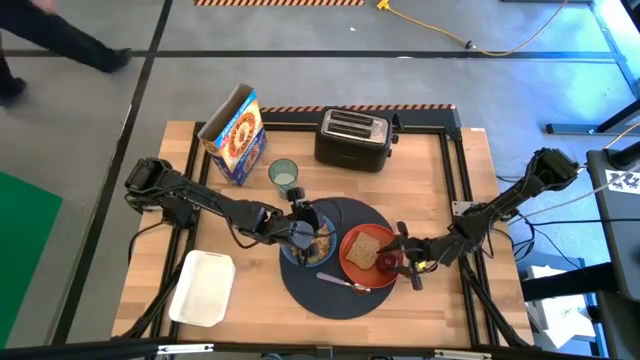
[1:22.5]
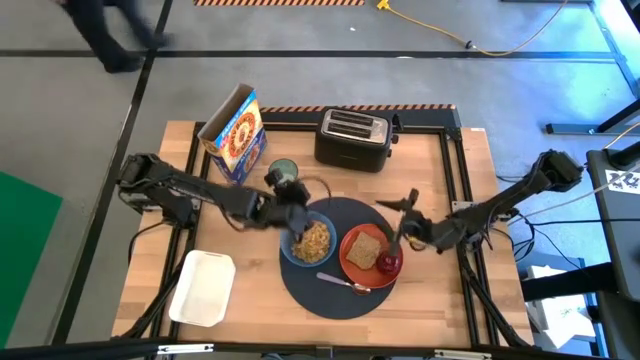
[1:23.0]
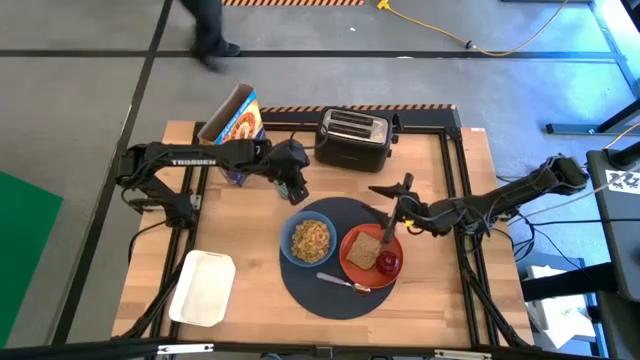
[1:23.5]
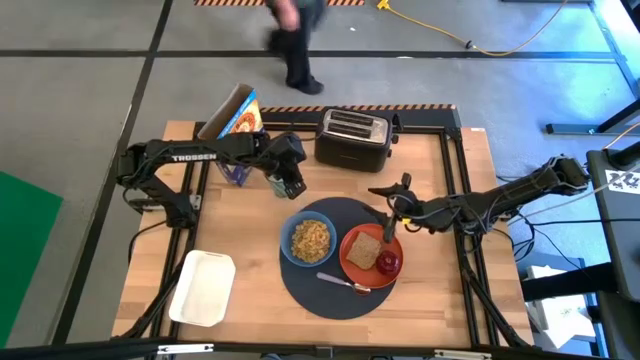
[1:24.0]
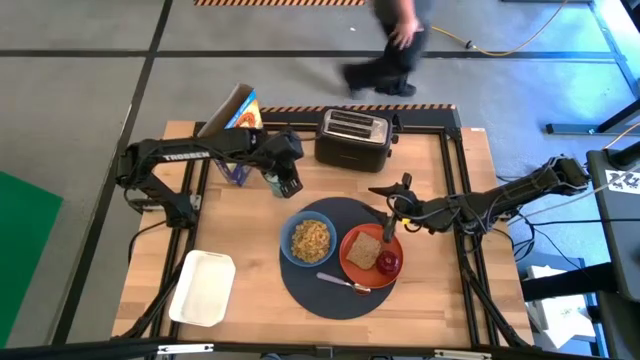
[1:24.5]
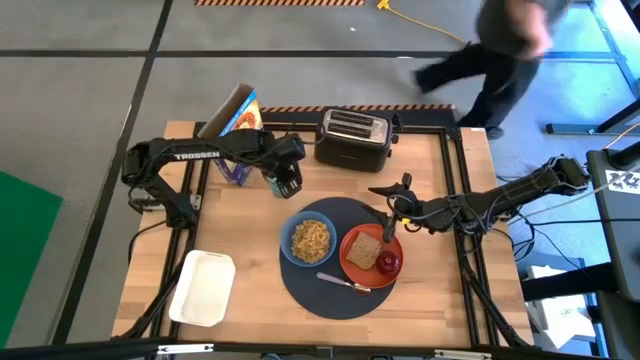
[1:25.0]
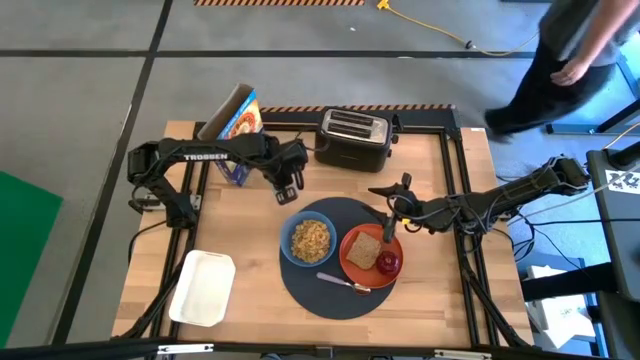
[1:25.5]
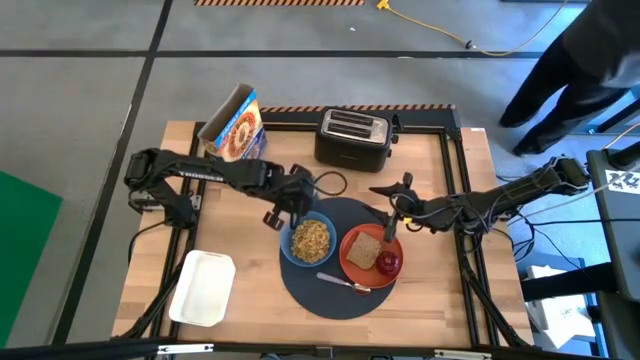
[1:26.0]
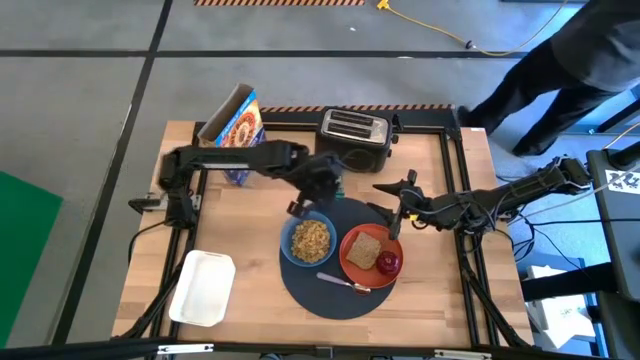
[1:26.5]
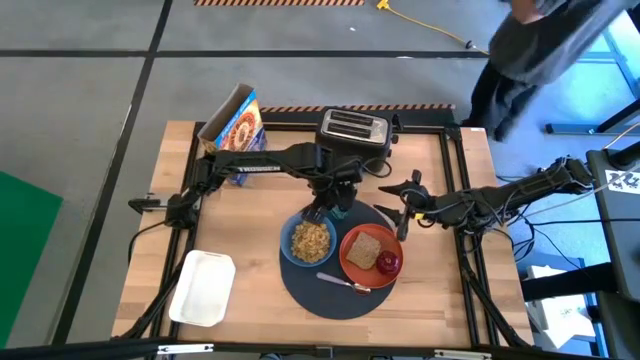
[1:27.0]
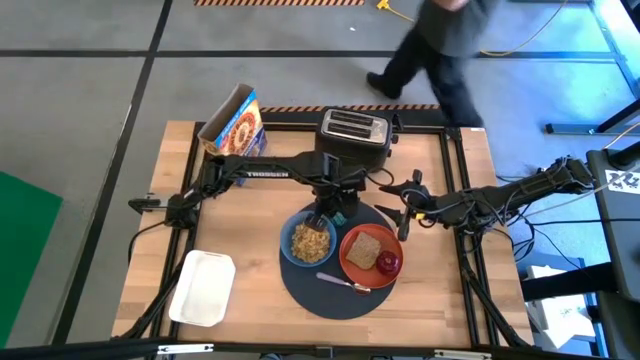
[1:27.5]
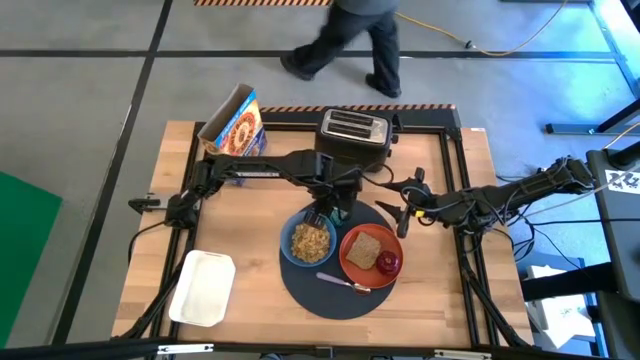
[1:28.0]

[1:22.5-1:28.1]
Task: Arrange a breakfast setting
Put the cup of milk on the place mat

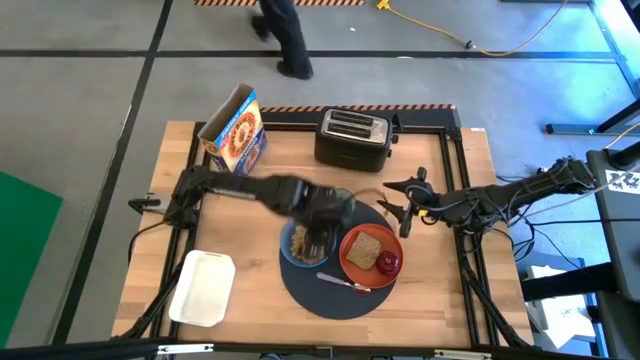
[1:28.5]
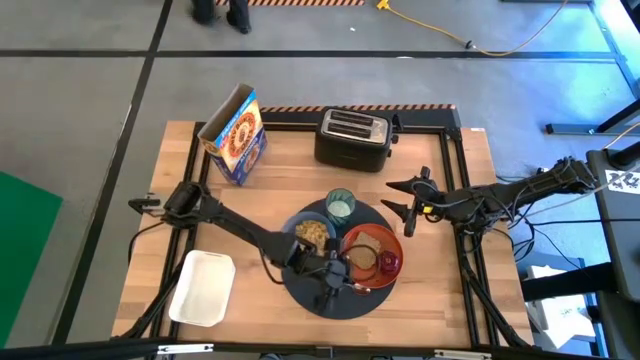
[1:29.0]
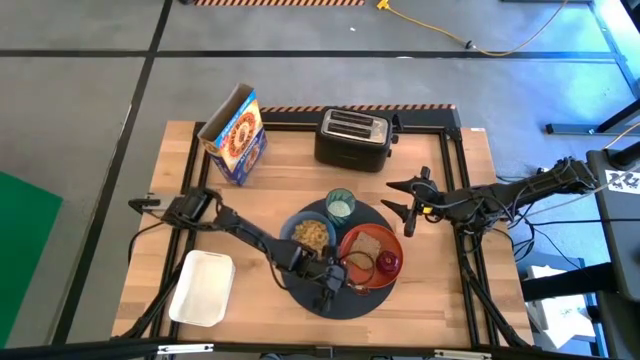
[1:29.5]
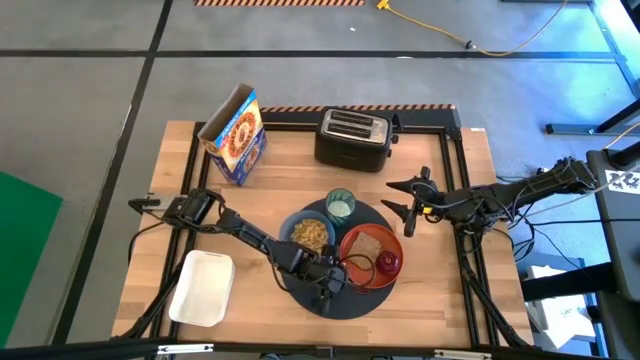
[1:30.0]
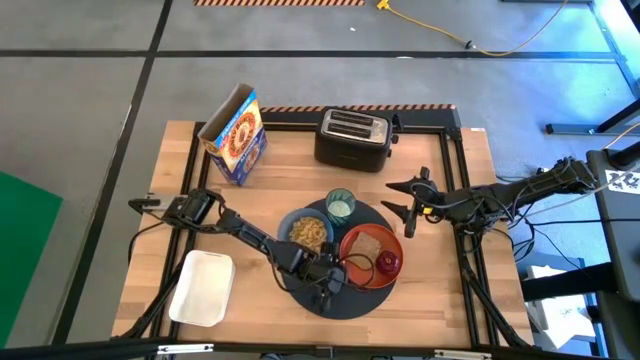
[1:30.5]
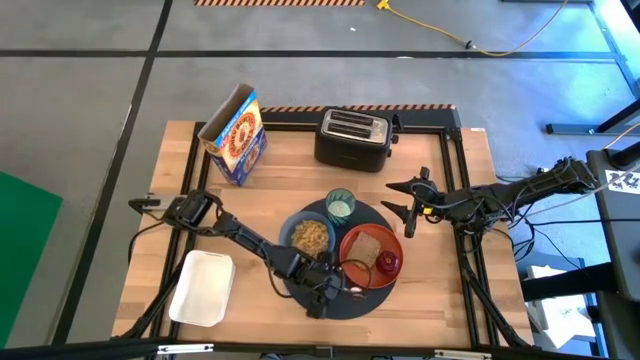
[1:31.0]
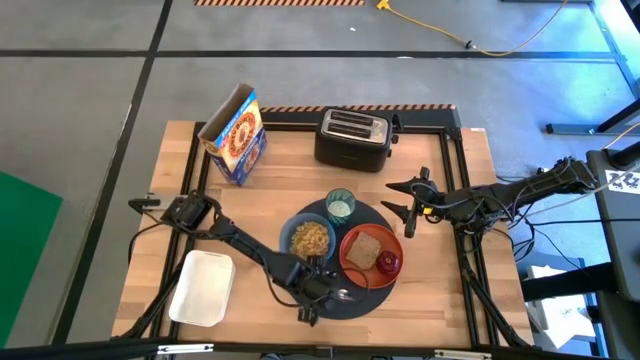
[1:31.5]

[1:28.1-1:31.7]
Adjust the purple spoon on the place mat

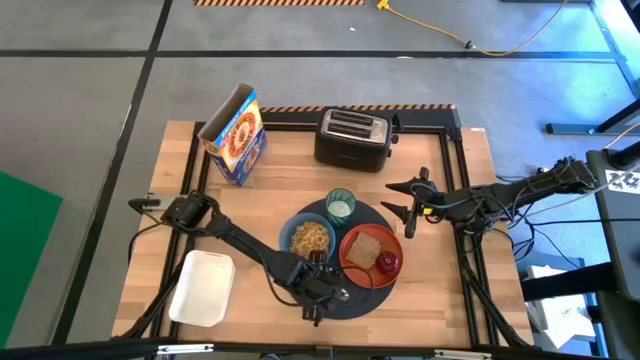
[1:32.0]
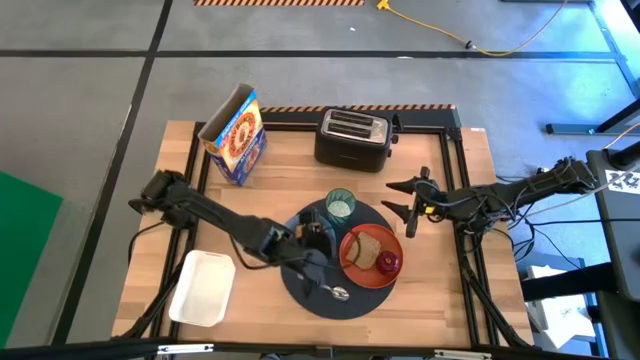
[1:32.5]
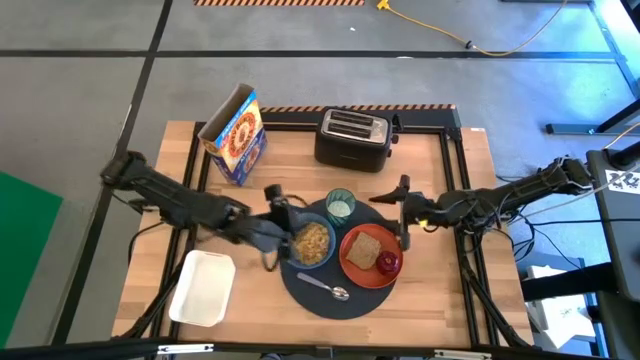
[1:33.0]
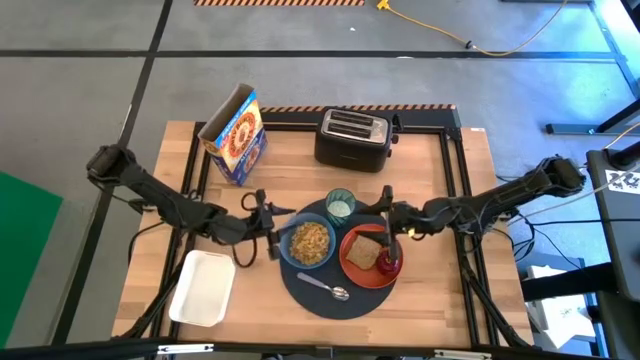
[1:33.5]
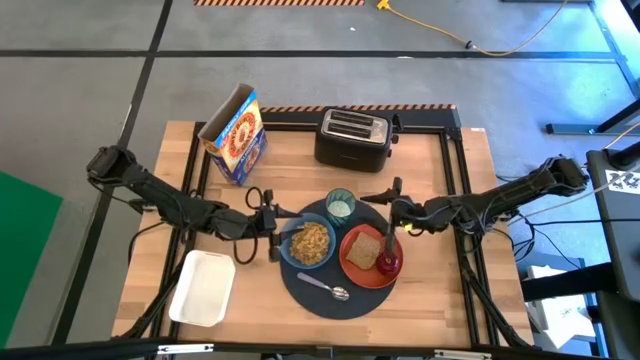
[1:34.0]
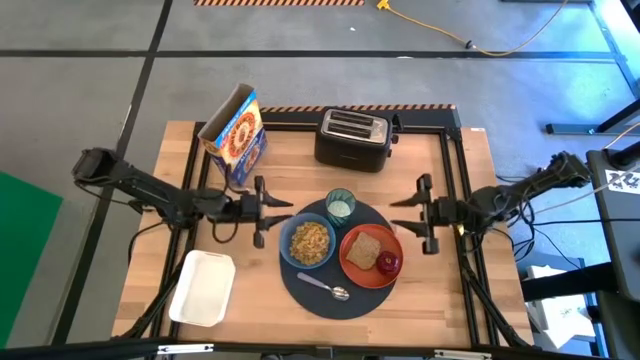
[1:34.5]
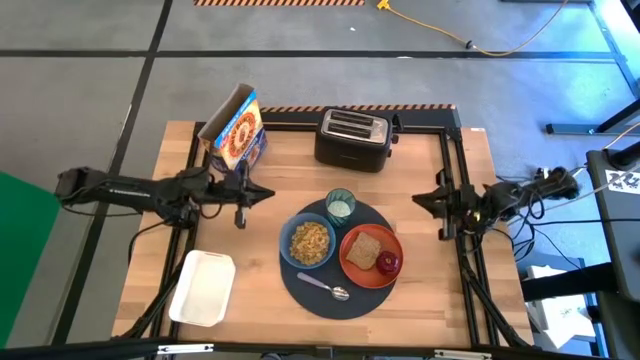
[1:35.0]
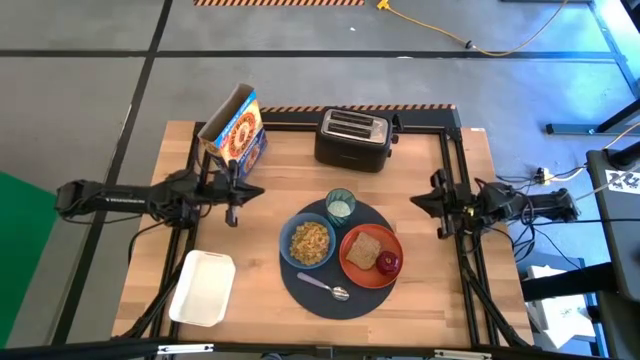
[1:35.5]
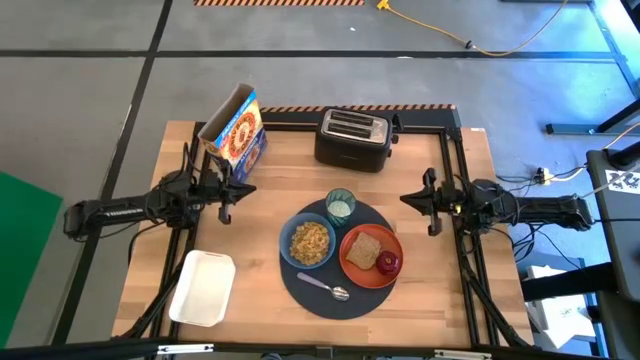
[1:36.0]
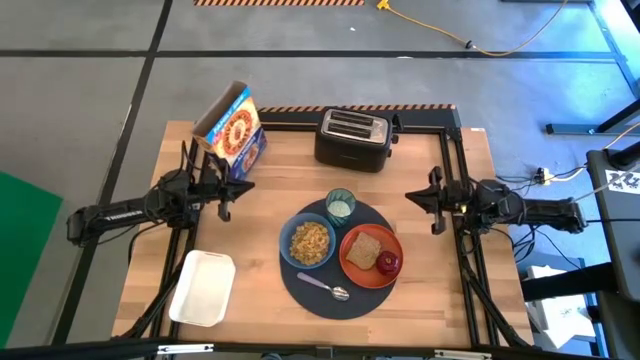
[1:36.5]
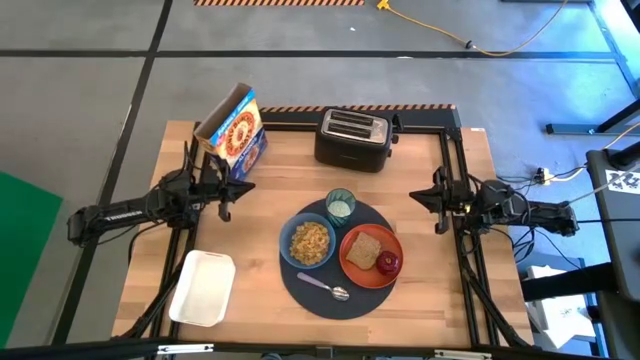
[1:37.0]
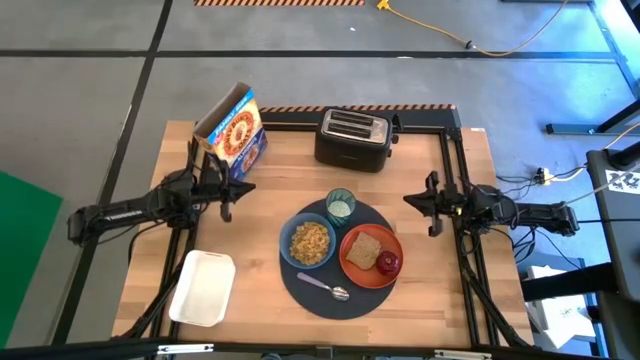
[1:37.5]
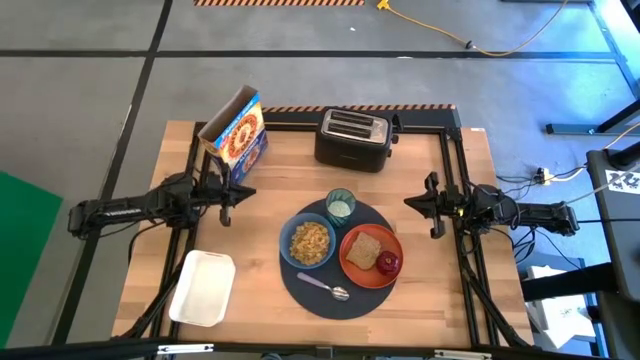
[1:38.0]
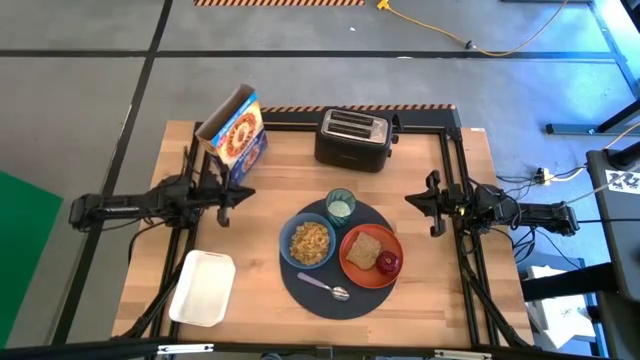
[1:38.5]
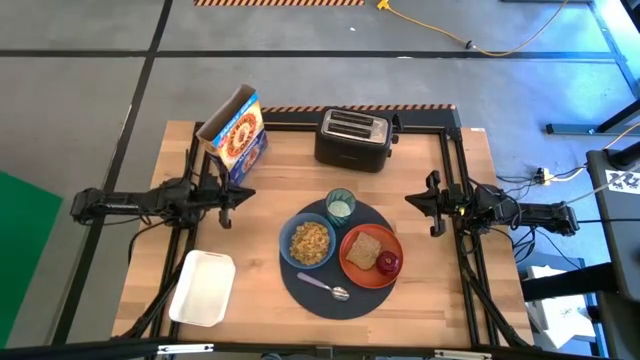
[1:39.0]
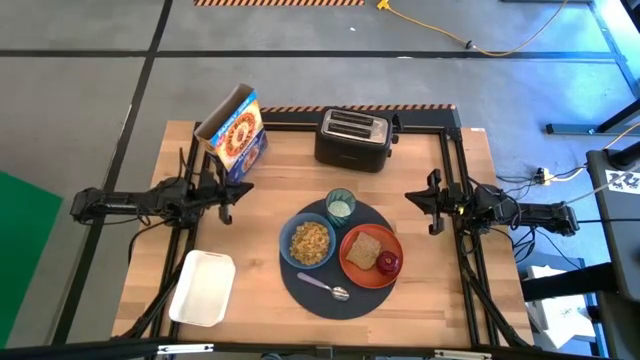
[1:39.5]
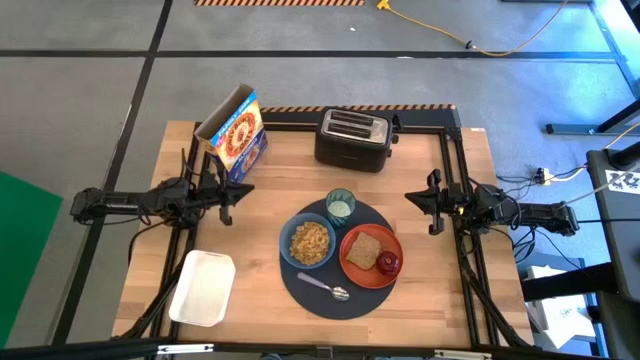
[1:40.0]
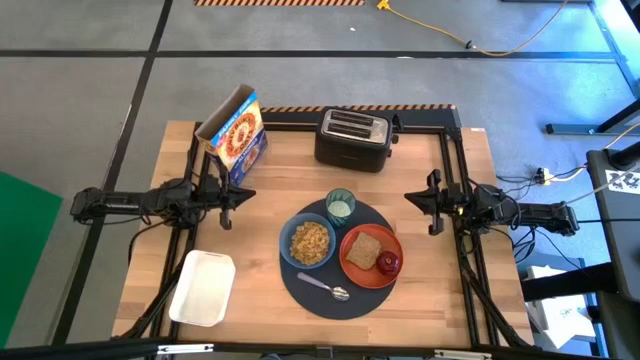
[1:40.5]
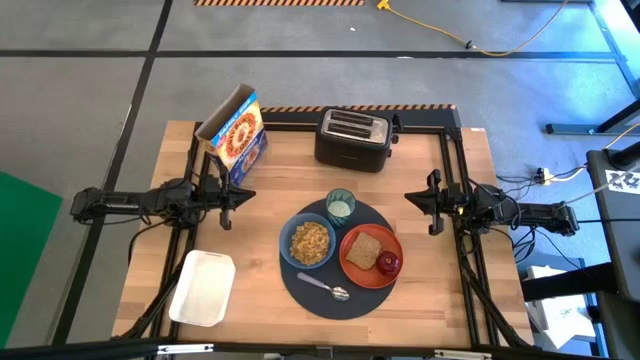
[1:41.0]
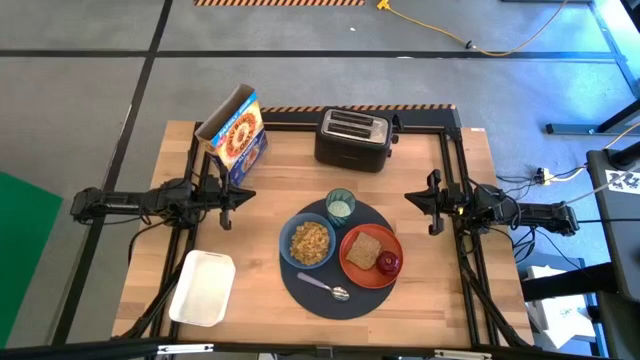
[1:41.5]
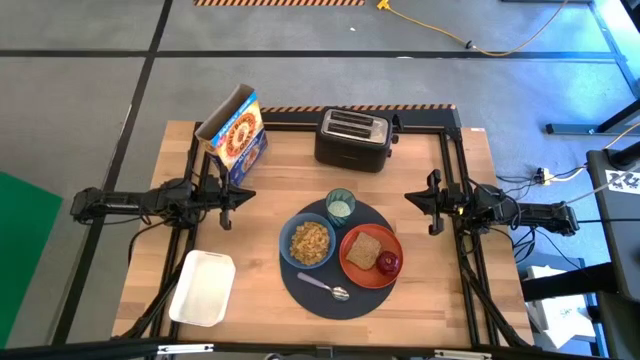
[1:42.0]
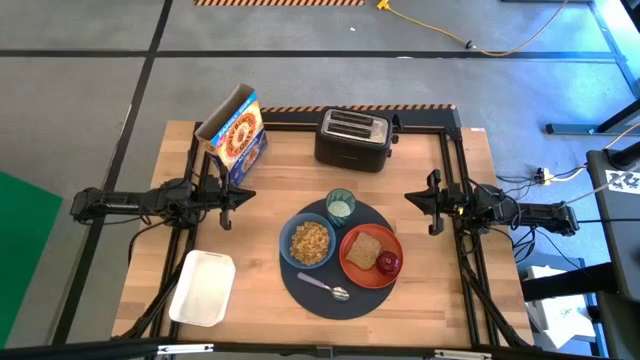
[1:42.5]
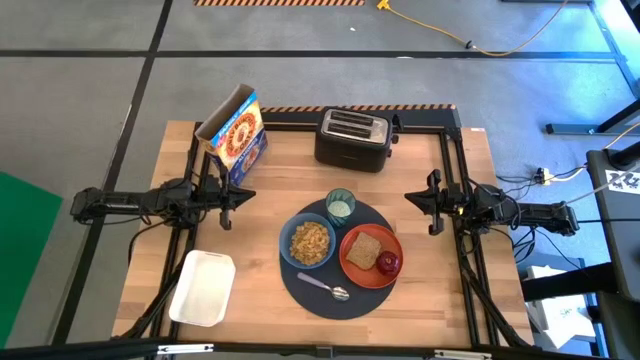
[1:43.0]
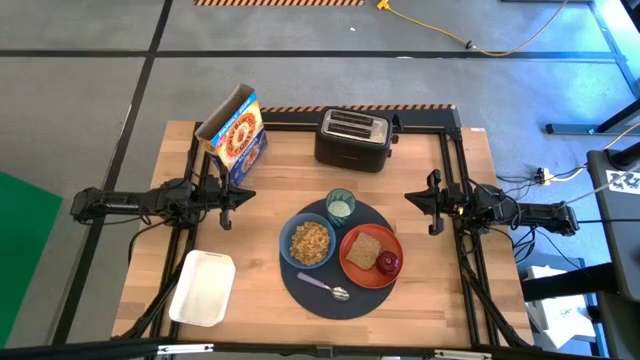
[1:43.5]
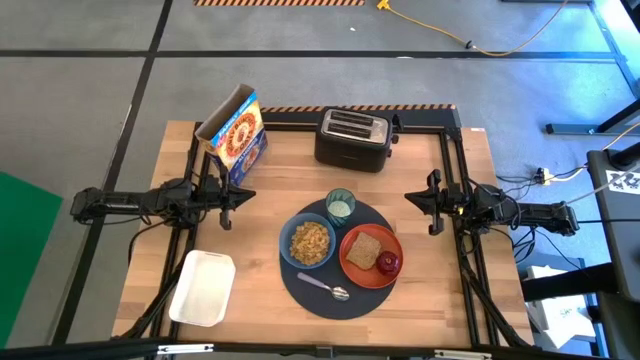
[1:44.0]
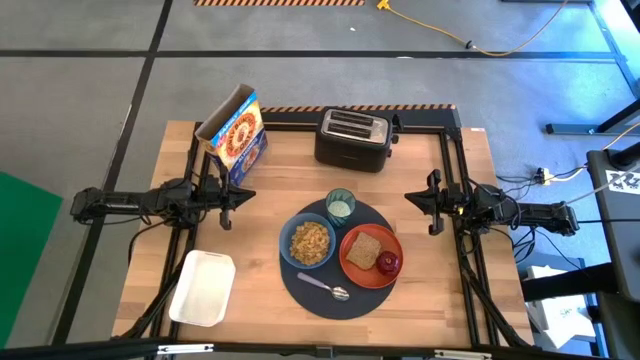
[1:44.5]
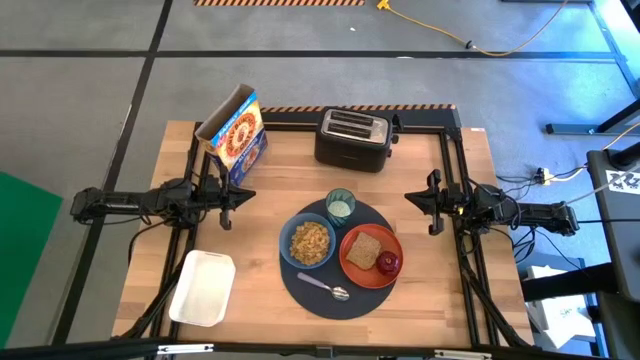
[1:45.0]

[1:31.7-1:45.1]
Return to Home Position
